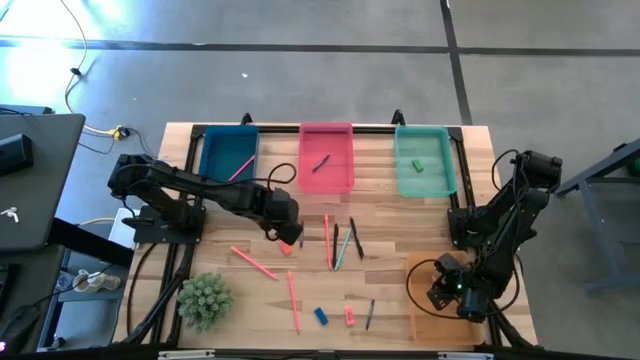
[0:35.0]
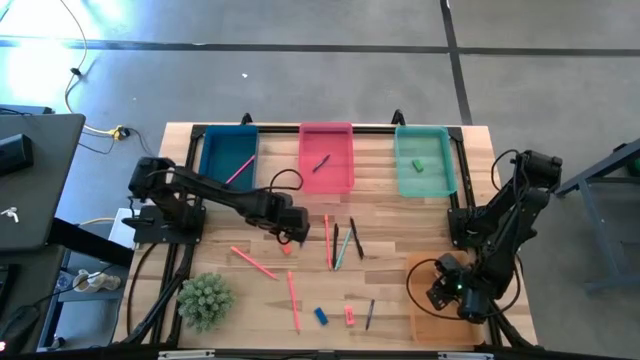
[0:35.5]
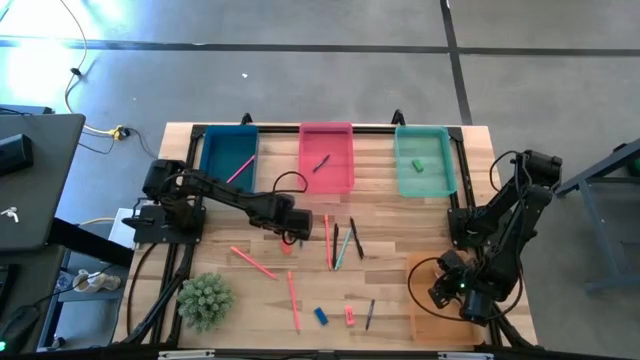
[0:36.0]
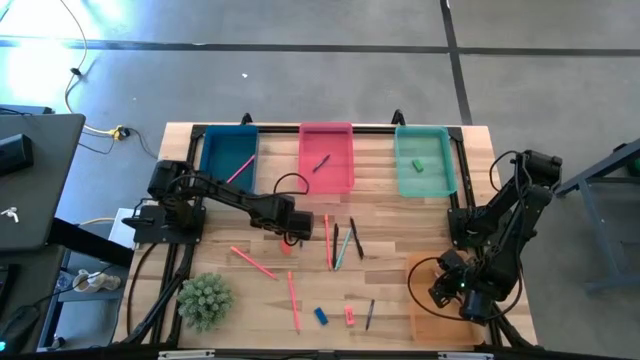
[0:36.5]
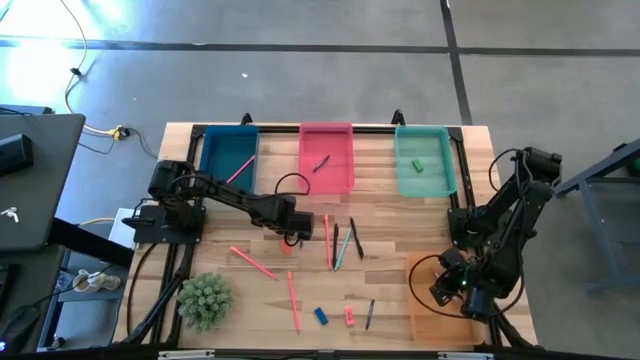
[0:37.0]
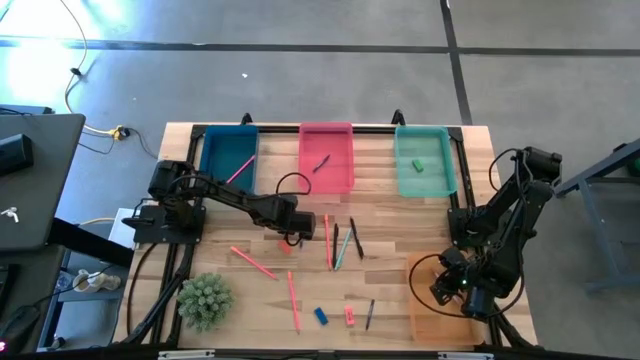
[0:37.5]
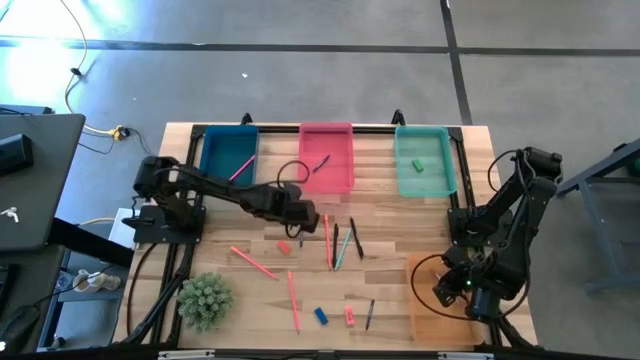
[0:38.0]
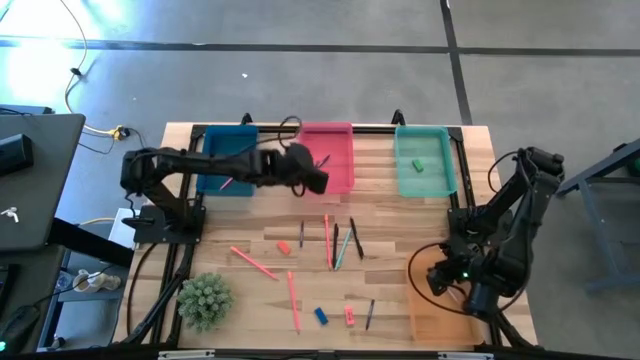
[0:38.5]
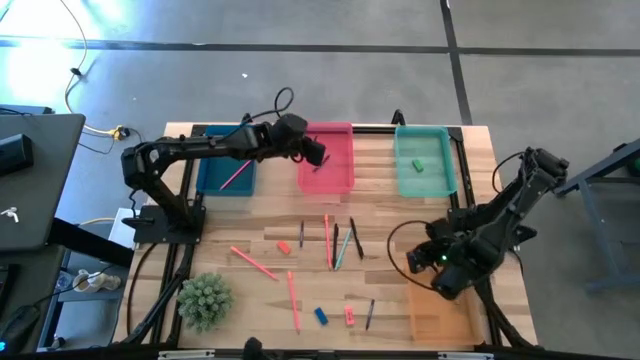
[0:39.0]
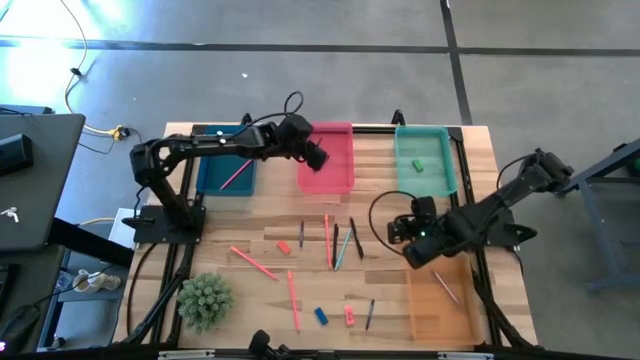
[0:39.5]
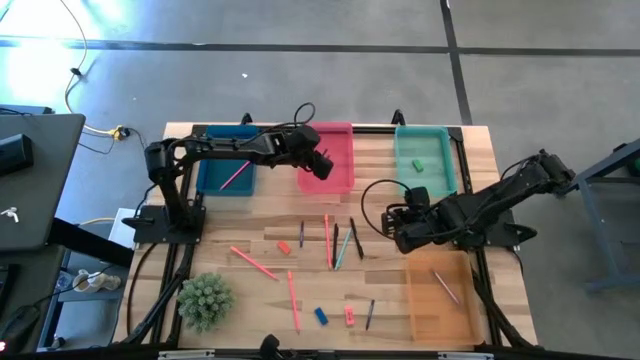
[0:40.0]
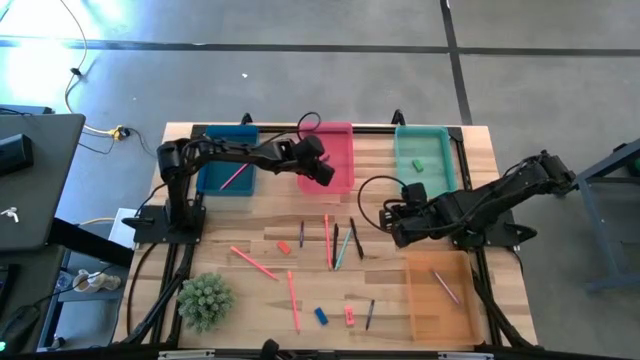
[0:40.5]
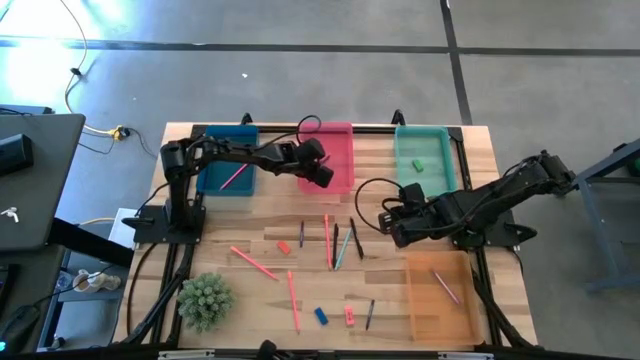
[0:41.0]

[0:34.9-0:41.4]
Task: Sort crayons/erasers/pens/pencils in bins
Put the blue crayon into the red bin

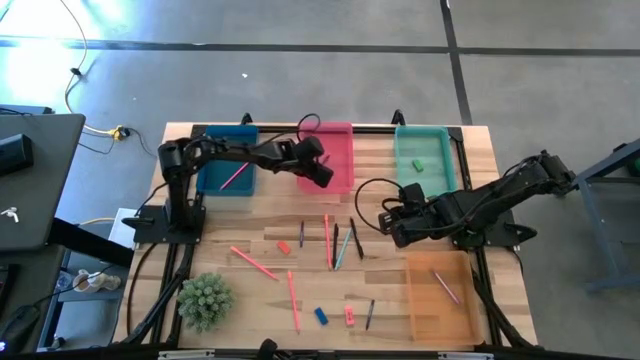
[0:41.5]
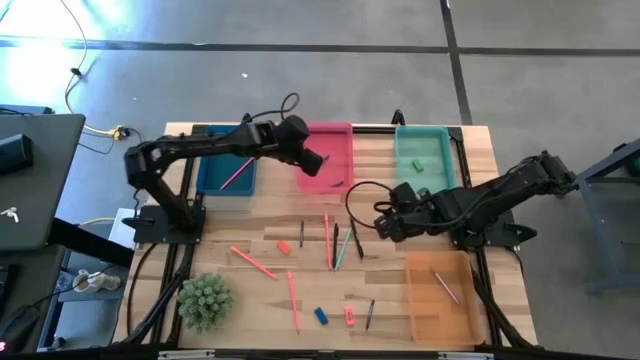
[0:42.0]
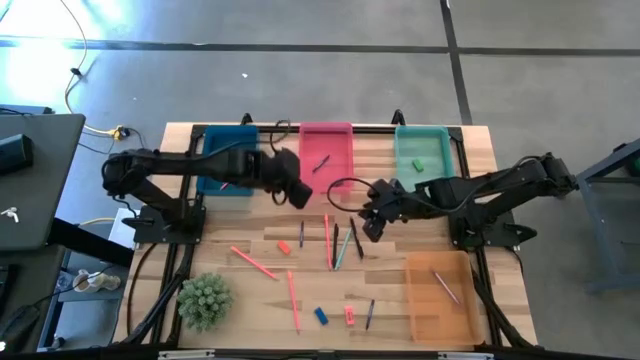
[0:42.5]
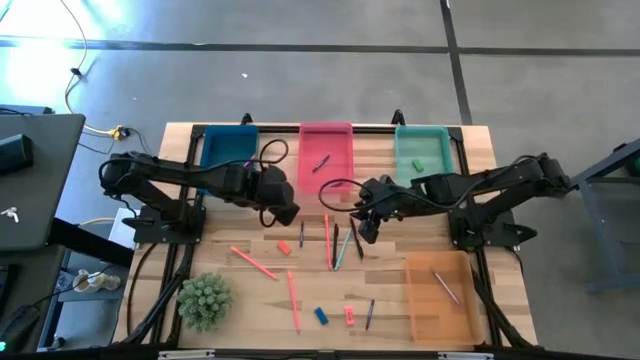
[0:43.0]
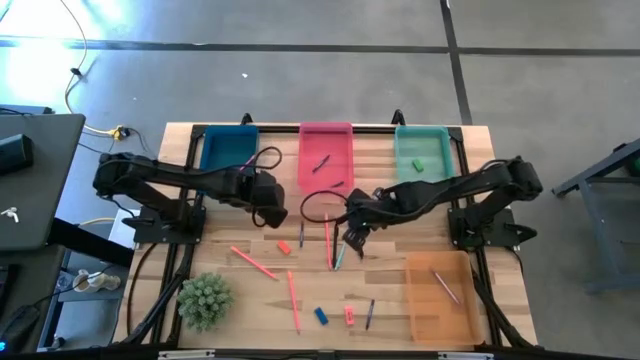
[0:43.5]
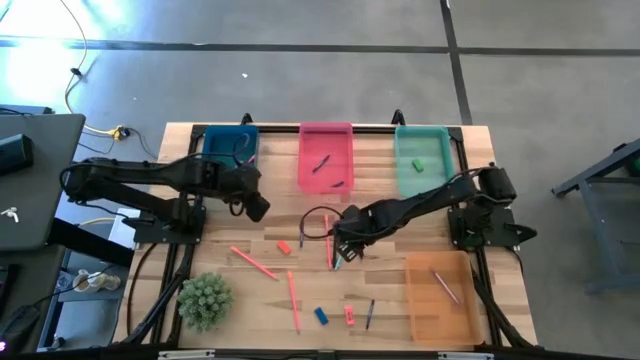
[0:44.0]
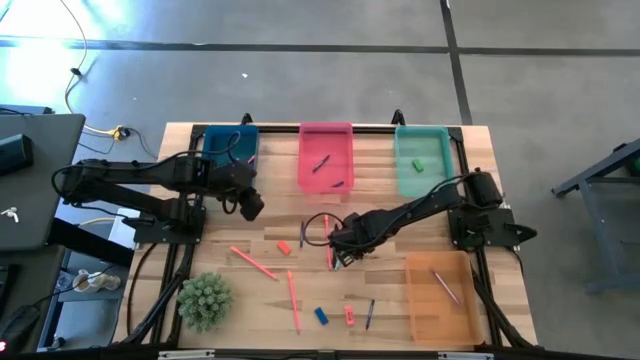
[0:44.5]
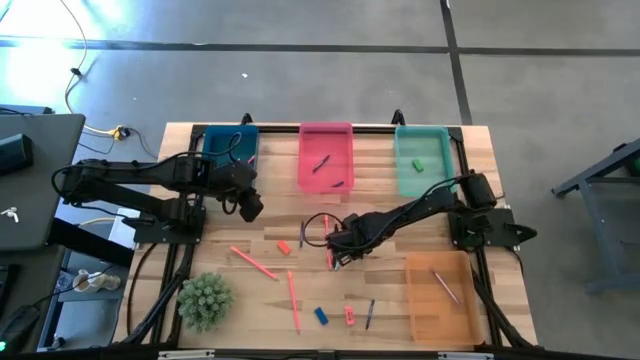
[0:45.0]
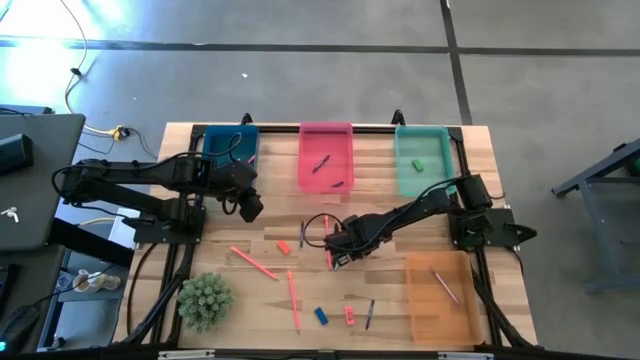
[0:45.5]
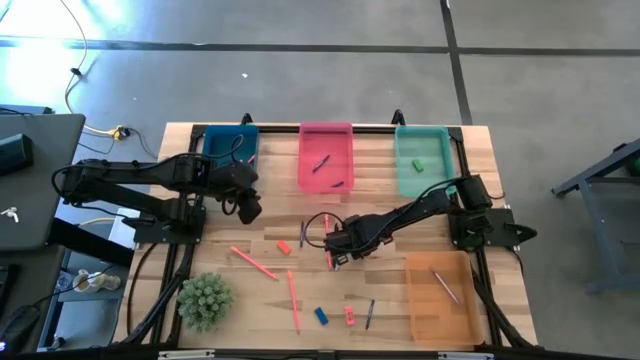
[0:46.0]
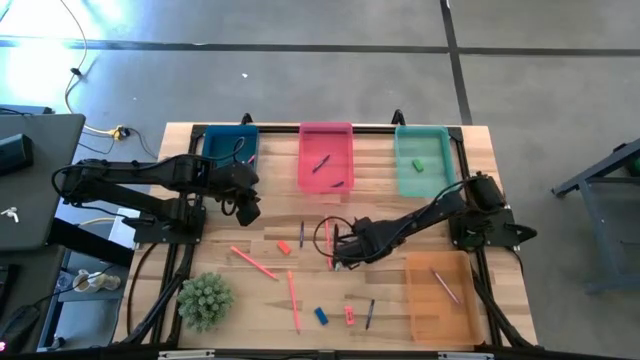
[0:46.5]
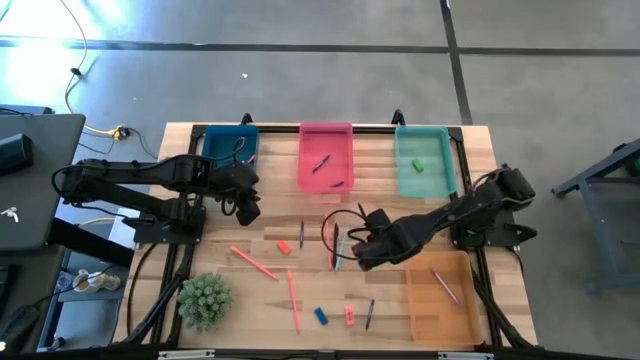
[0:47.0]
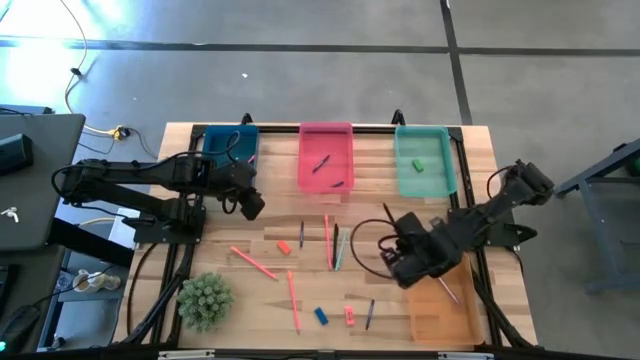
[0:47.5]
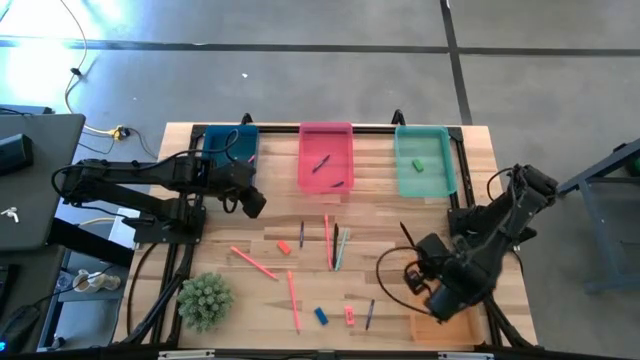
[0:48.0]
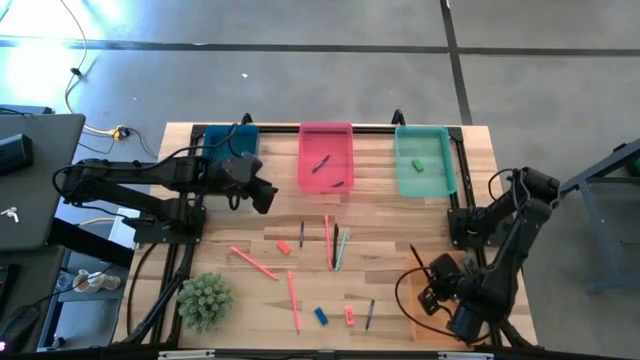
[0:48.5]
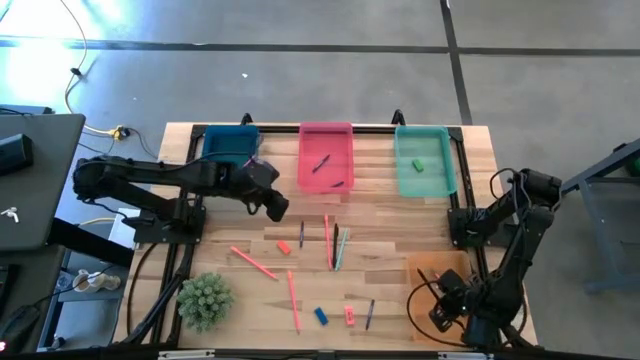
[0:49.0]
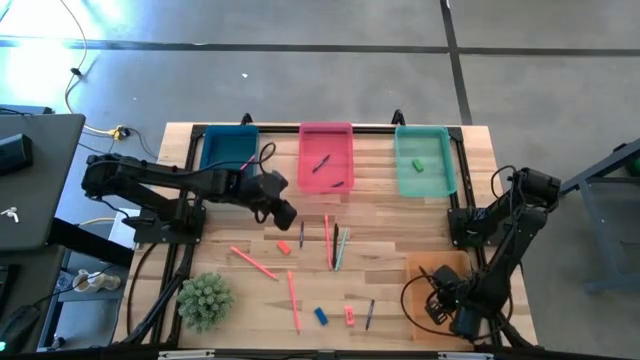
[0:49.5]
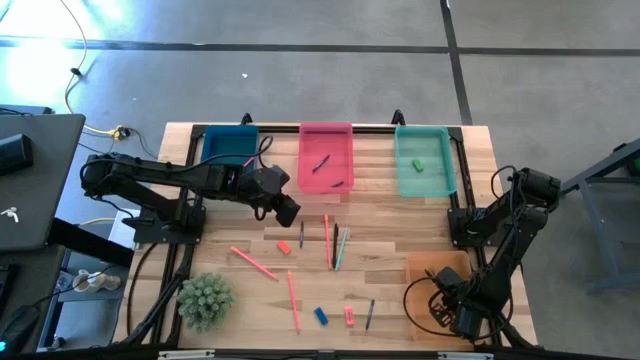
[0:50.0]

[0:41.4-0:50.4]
Put the black pen into the orange bin

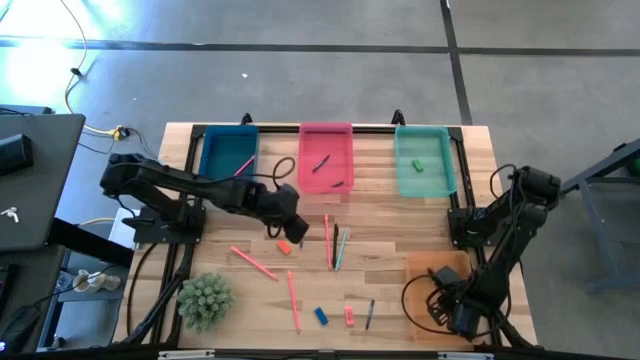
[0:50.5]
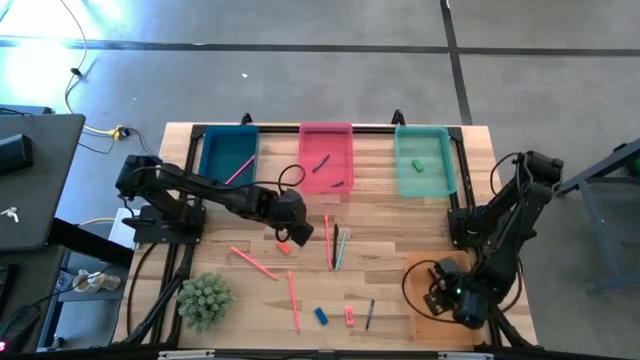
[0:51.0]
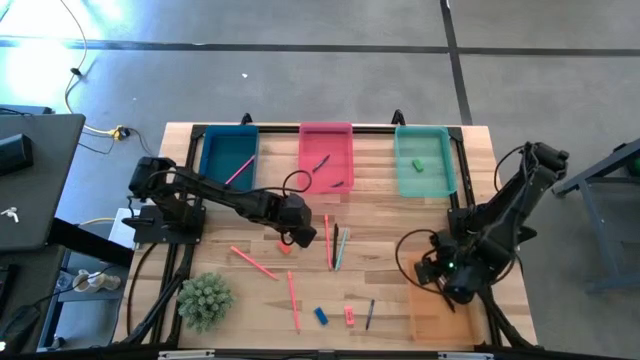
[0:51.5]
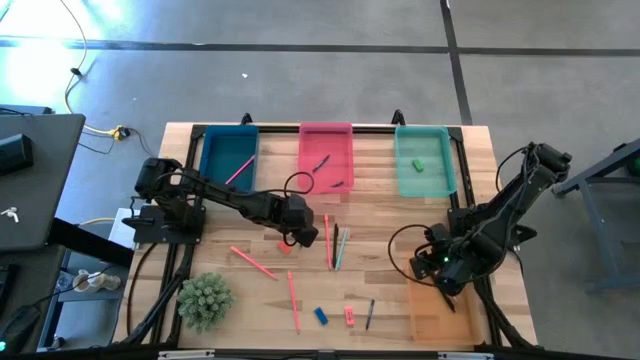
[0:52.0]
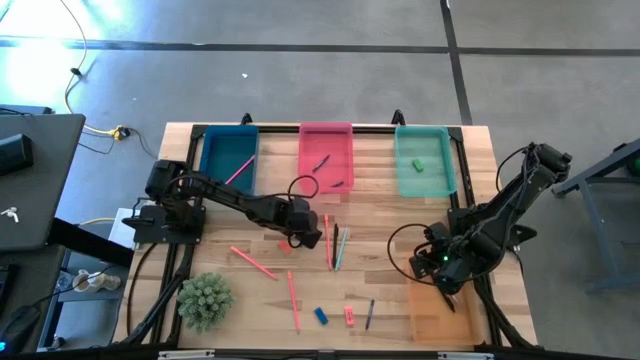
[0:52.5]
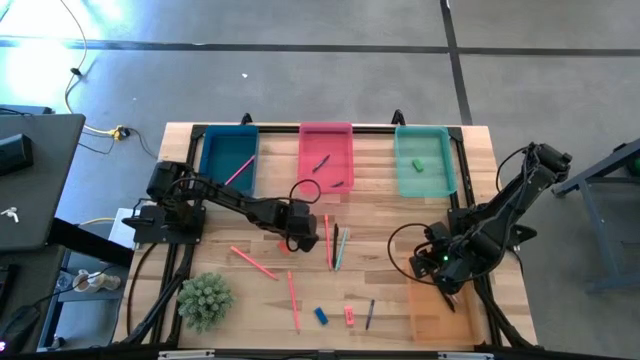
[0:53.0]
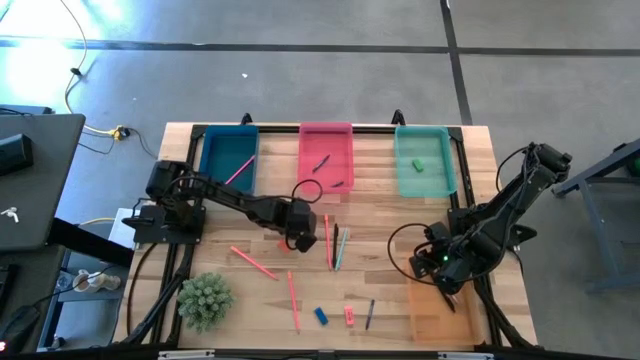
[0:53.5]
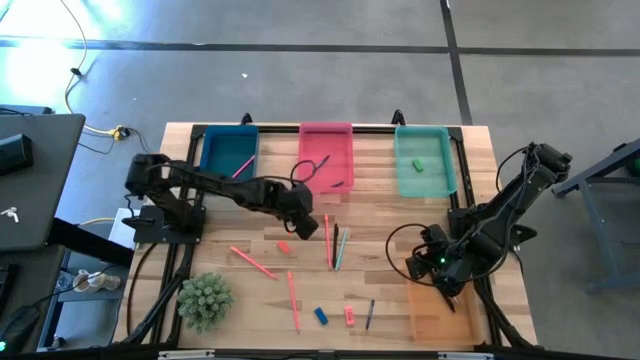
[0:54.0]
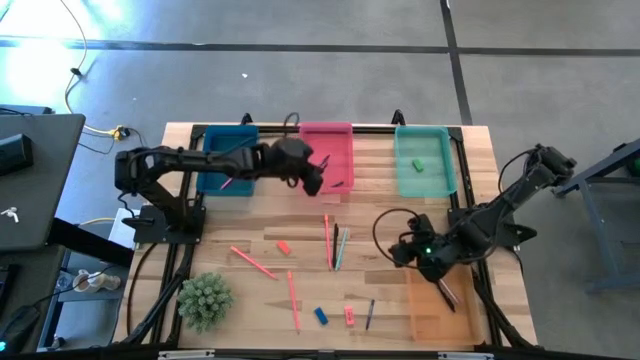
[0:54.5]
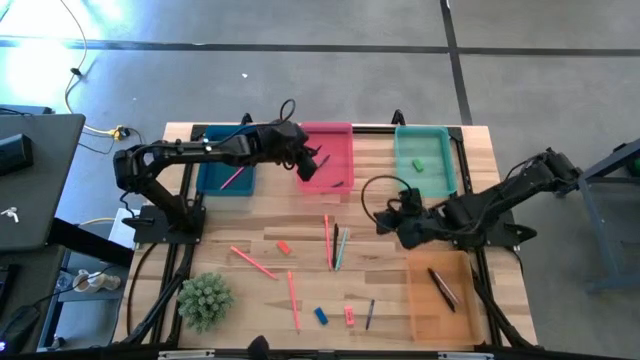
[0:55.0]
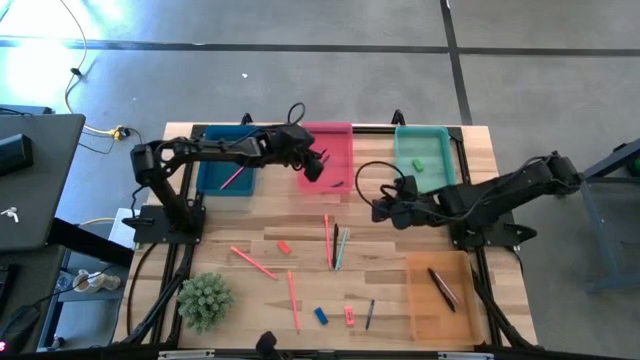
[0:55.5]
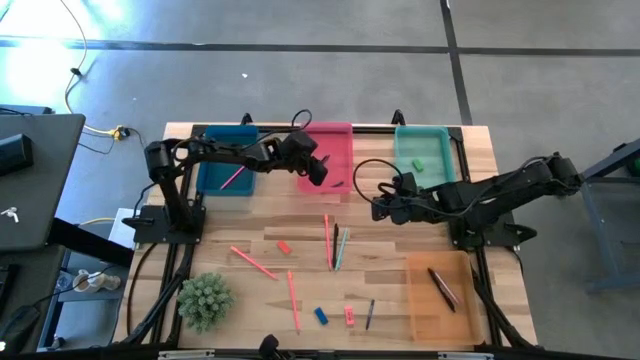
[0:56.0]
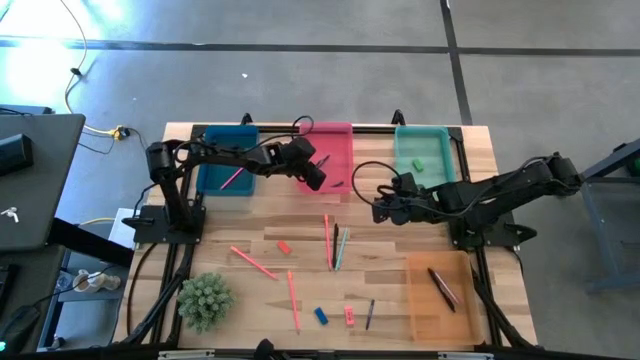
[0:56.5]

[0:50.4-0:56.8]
Put the blue crayon into the red bin
